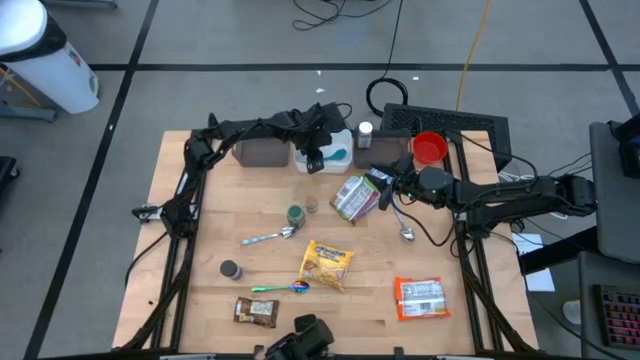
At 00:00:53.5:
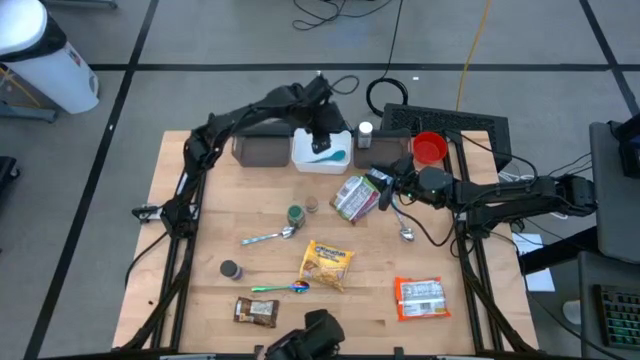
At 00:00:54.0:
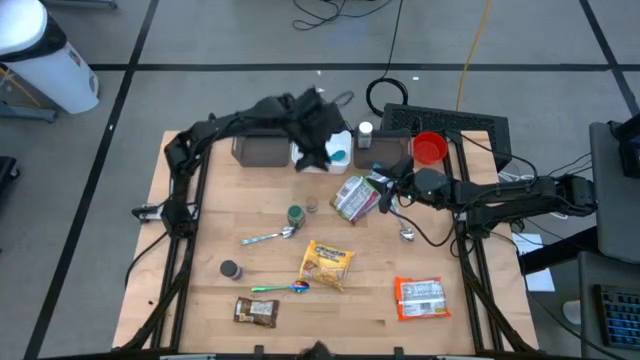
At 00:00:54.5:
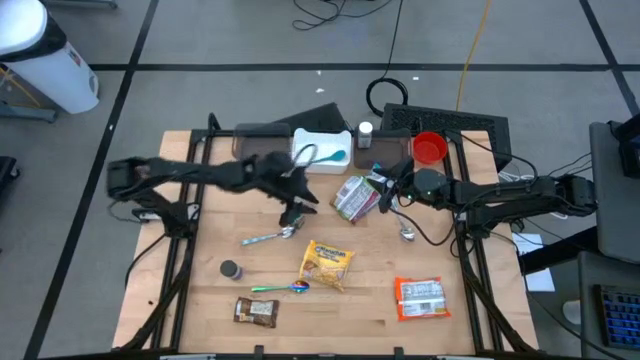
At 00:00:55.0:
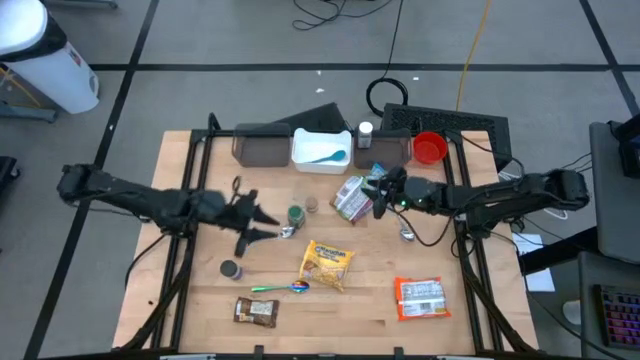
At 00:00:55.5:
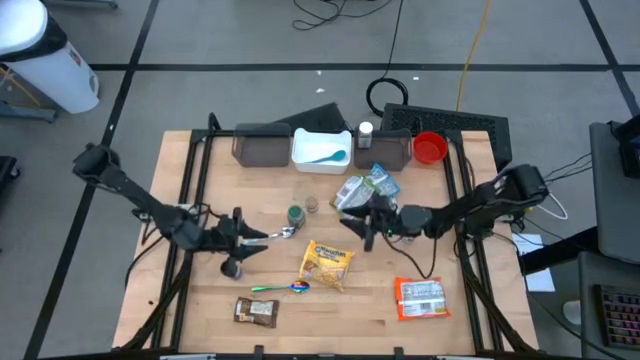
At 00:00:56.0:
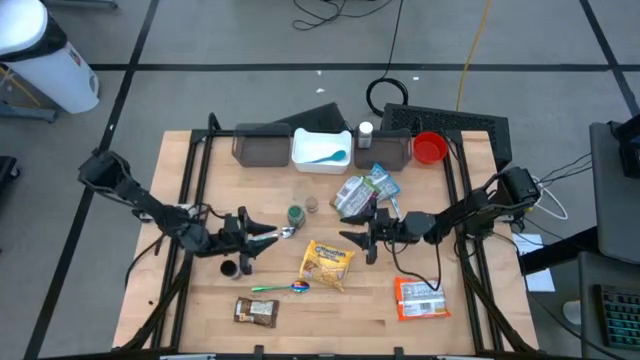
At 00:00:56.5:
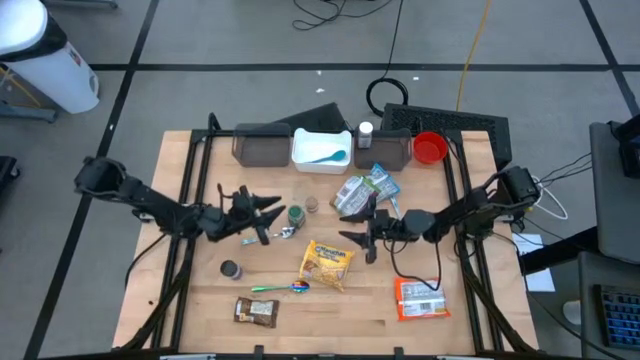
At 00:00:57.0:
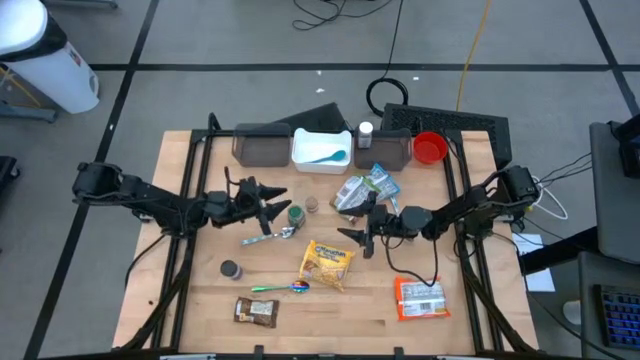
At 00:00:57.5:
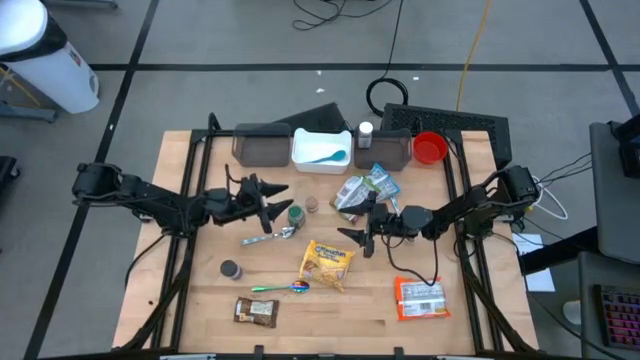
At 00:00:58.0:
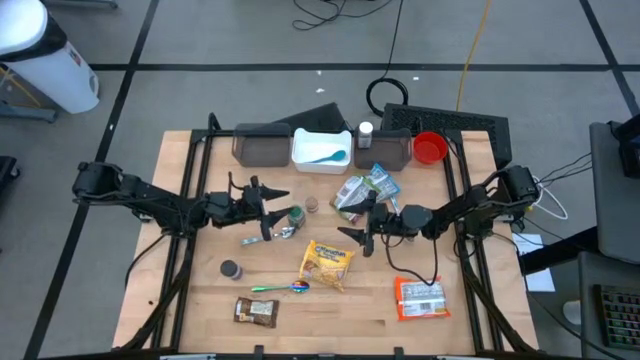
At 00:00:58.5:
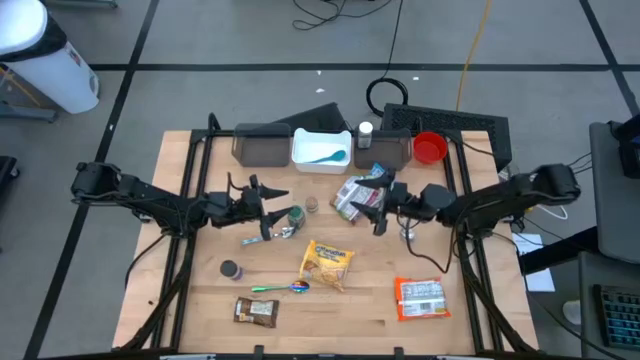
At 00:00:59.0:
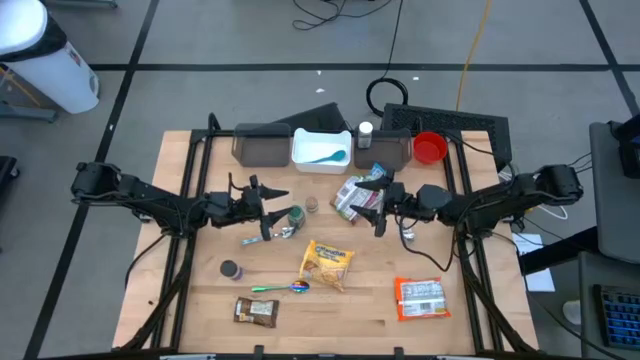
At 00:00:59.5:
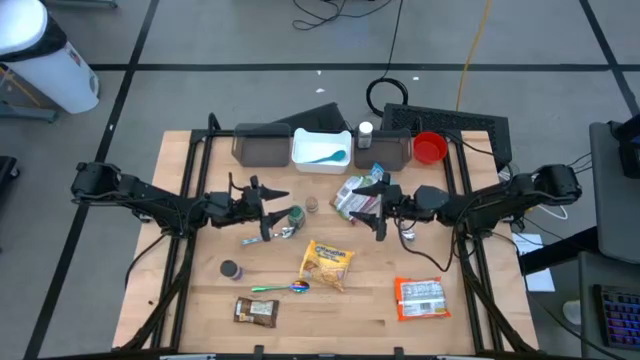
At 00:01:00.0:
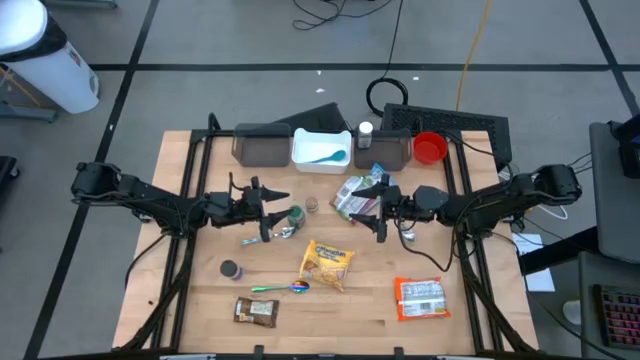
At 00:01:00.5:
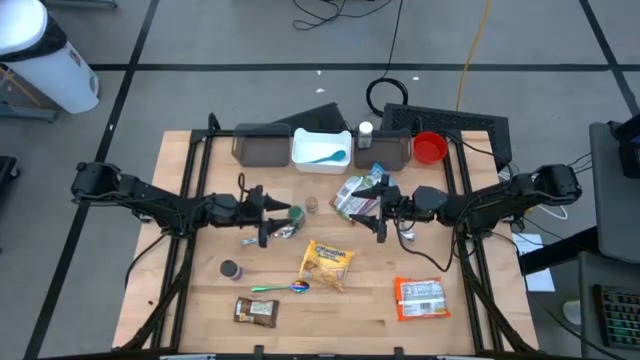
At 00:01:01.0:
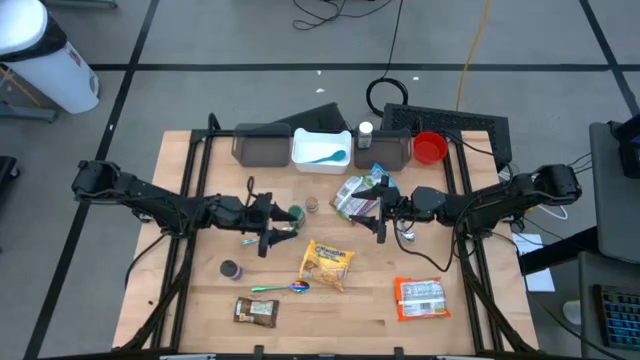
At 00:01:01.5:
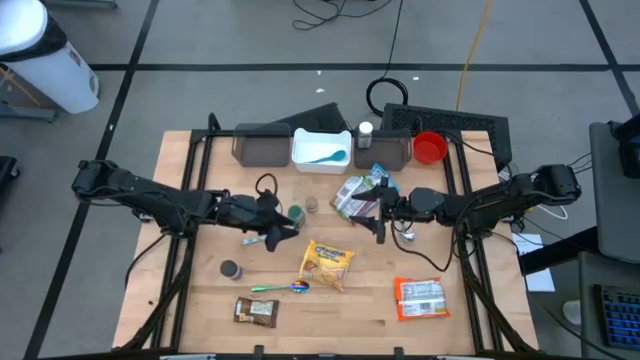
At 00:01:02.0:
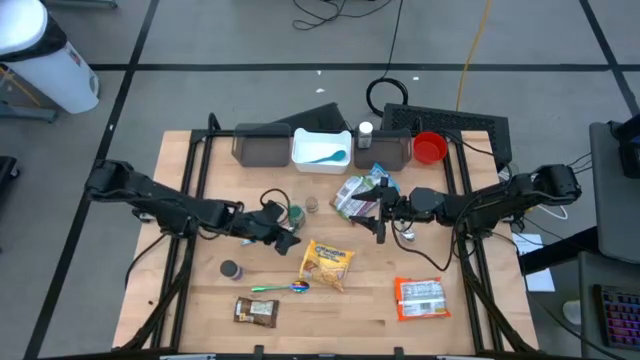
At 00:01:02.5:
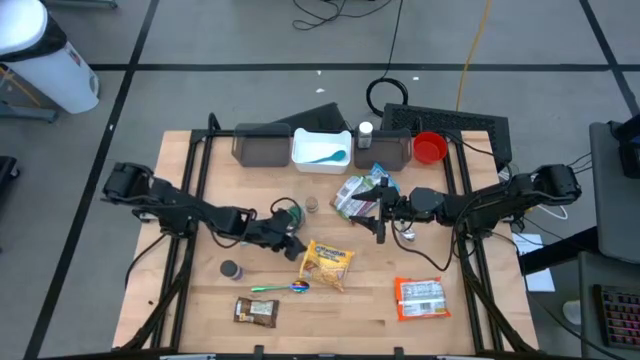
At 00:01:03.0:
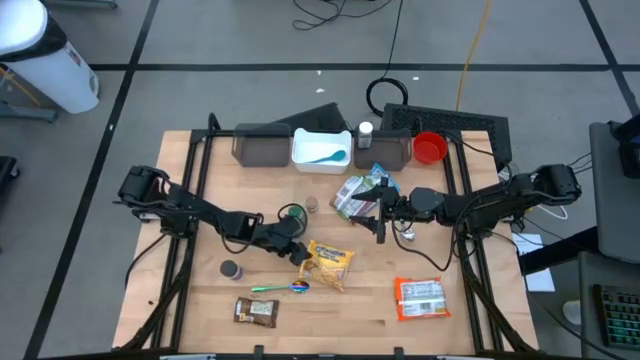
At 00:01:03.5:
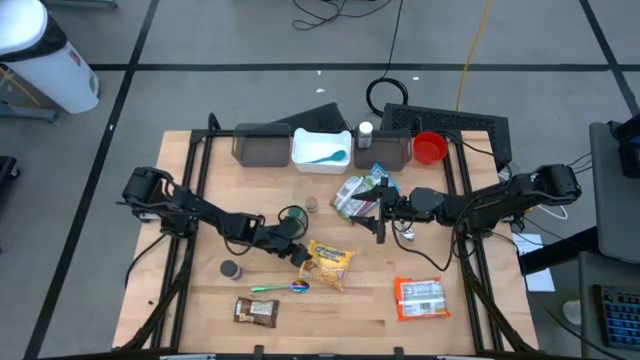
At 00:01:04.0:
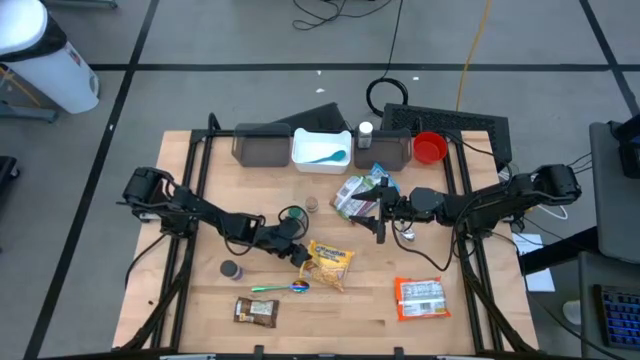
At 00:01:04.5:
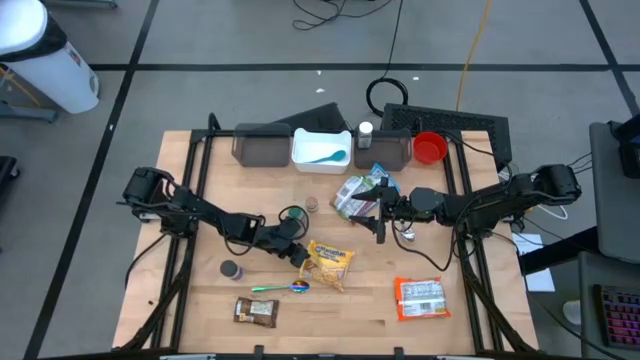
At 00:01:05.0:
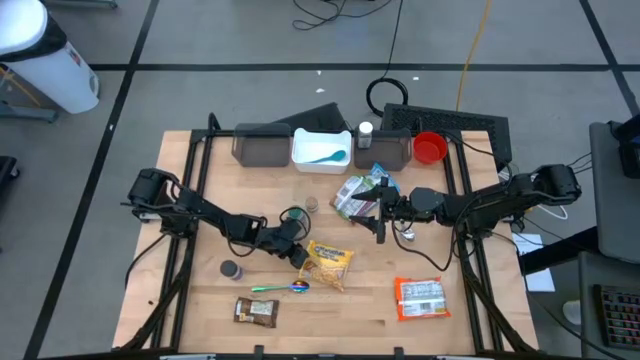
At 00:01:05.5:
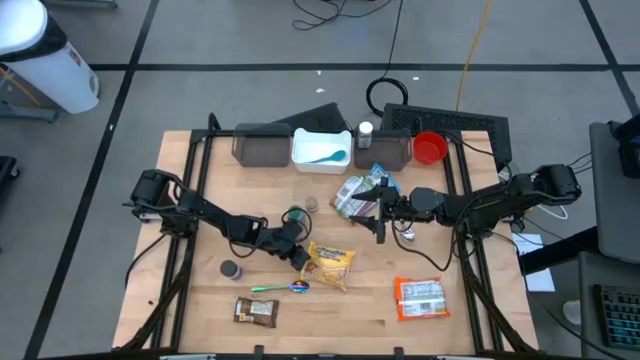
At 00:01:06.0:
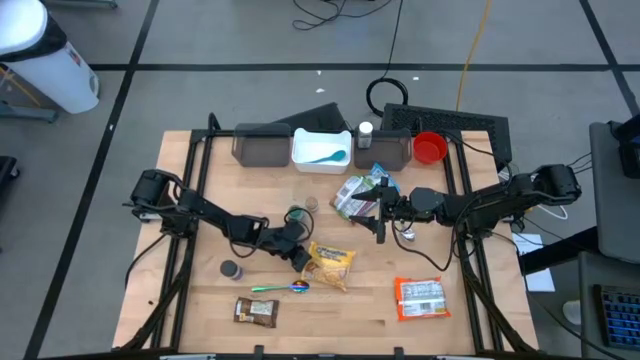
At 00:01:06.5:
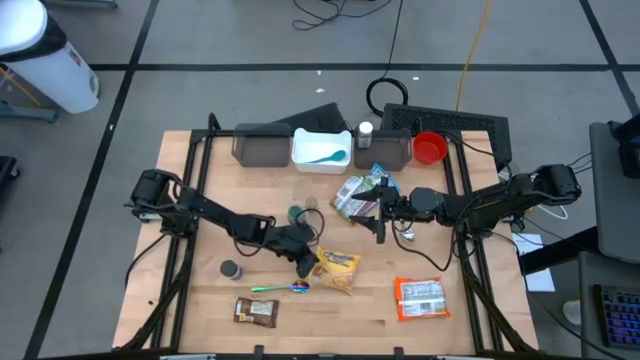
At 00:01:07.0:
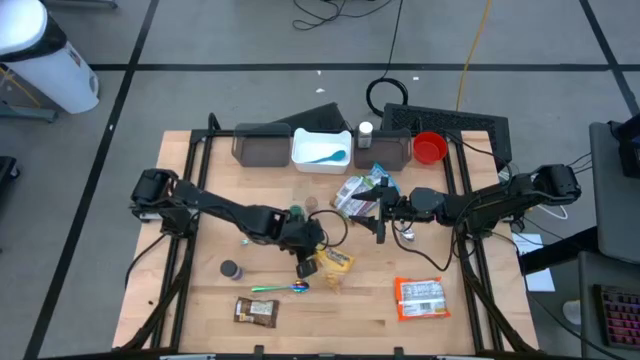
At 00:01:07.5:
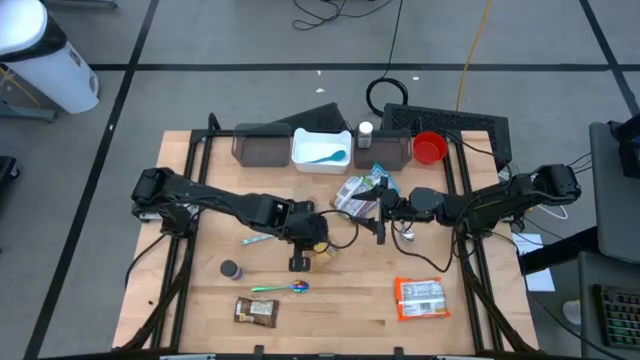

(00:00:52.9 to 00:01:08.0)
Task: Pick & Place Food Item
Put the yellow noodle pack into the left black bin

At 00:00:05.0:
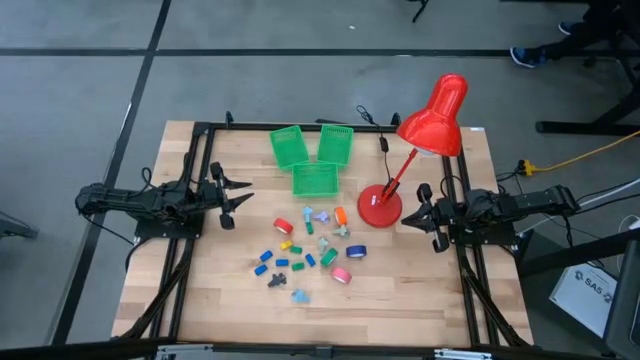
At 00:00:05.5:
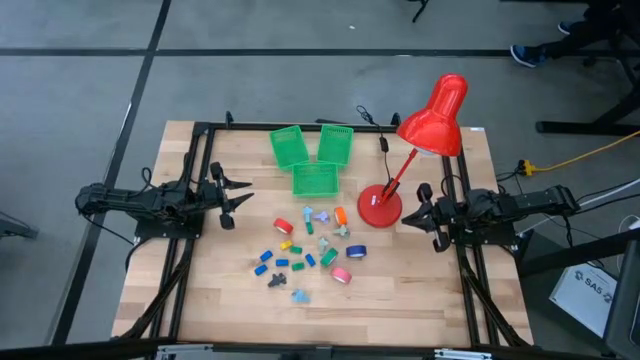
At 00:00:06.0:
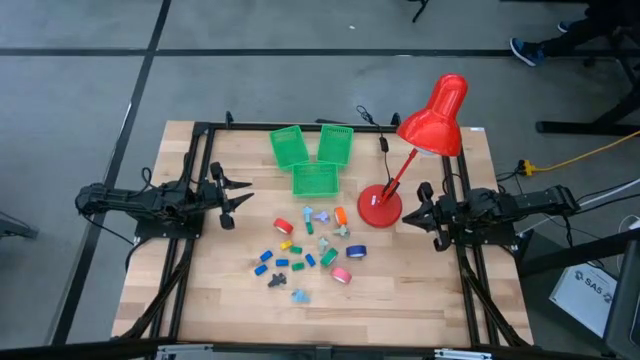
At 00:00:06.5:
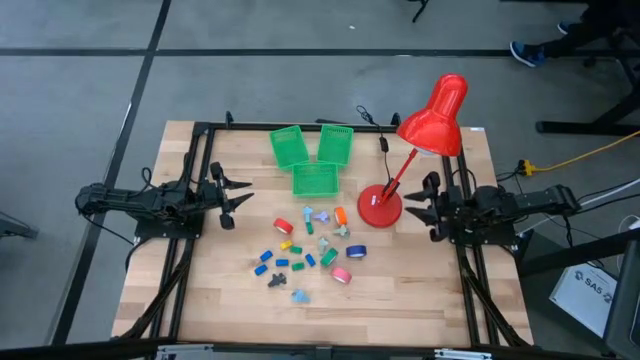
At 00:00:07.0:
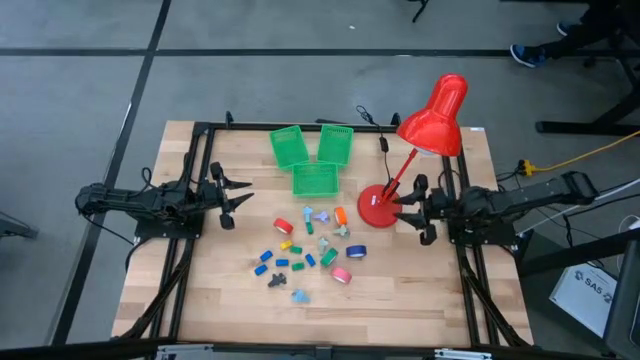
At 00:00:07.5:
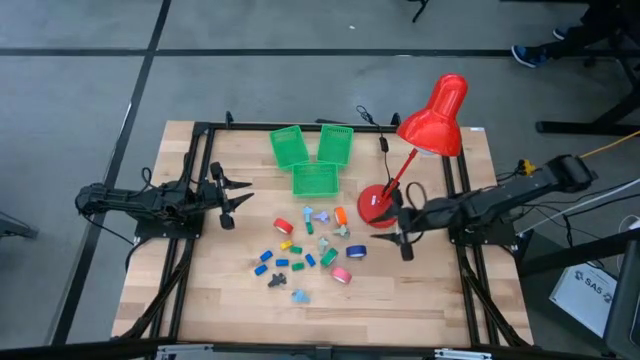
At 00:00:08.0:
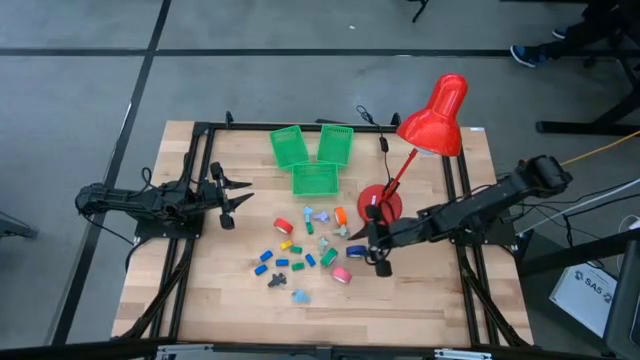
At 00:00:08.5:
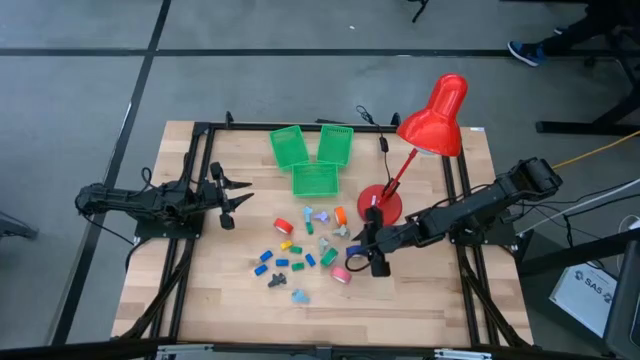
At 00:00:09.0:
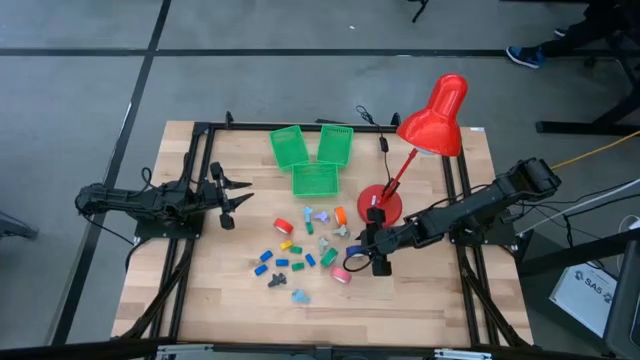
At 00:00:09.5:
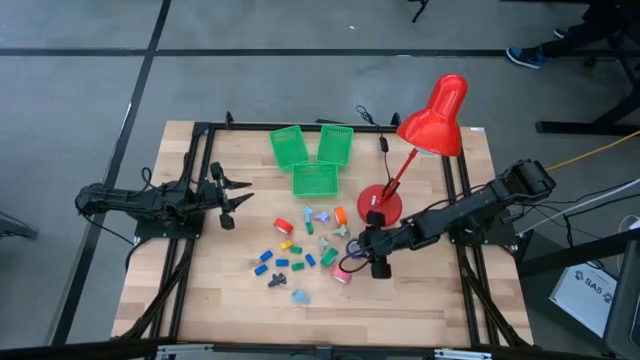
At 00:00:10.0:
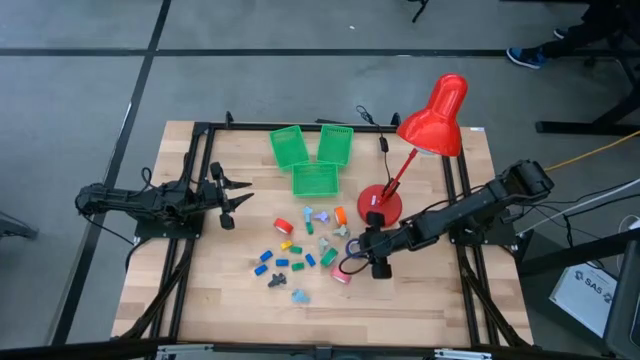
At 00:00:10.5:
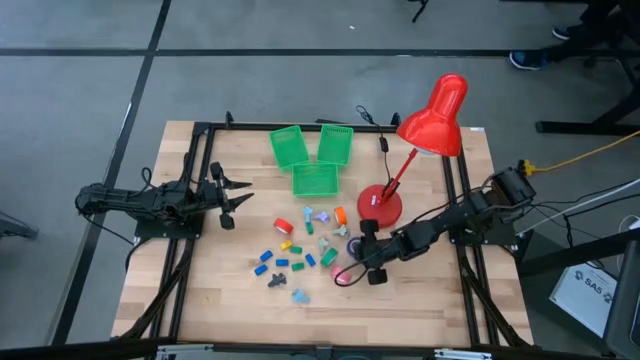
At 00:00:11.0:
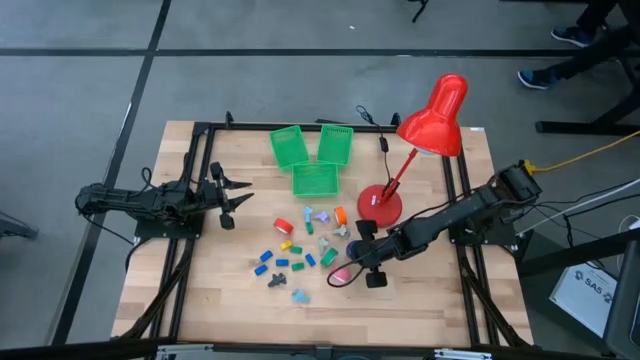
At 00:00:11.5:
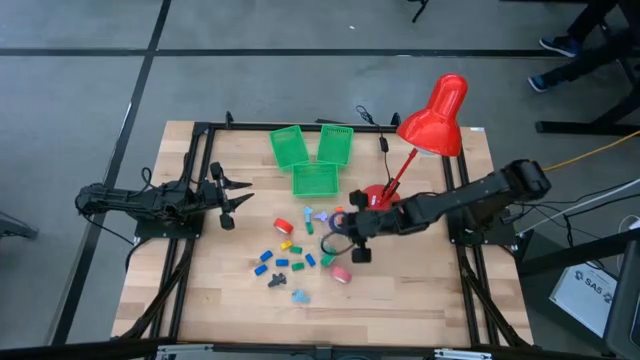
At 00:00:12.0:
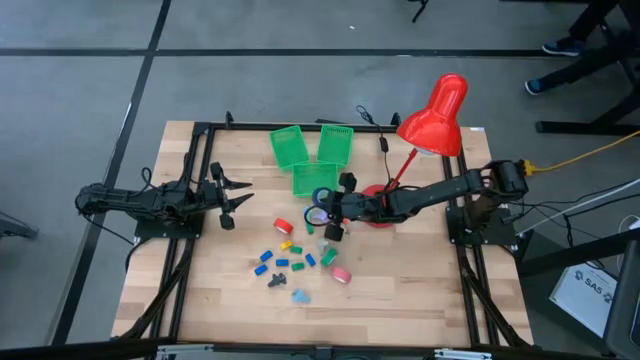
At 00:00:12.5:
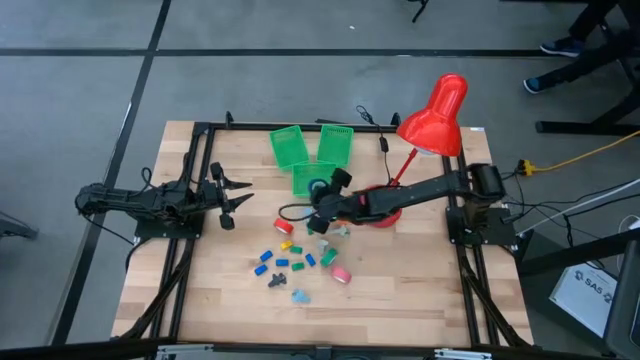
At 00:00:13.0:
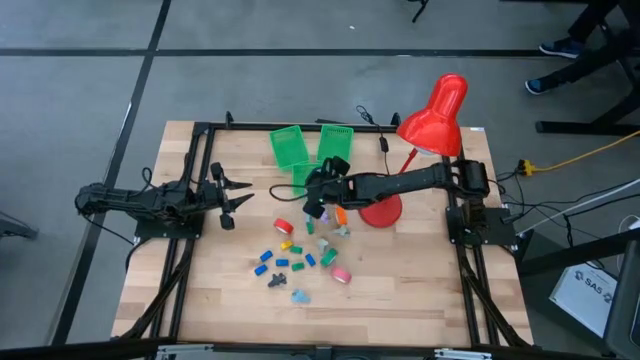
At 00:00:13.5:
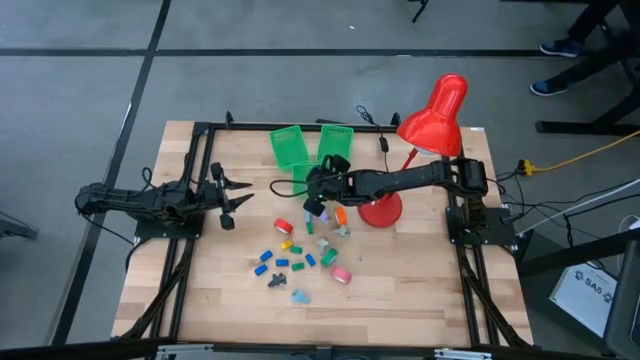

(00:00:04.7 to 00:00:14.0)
Task: Pick and place Stapler, Stapler remover, tape
Put the blue tape into the middle green bin
